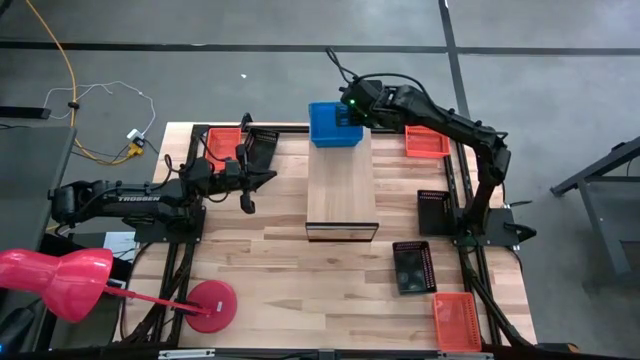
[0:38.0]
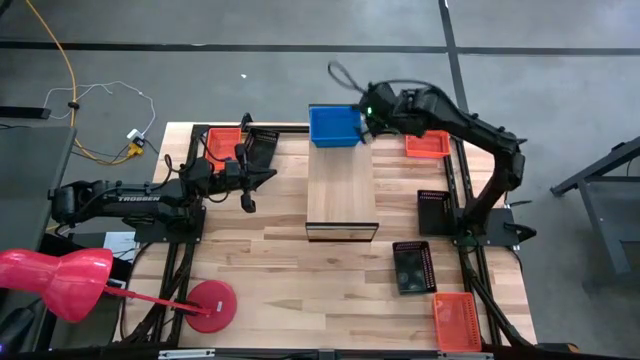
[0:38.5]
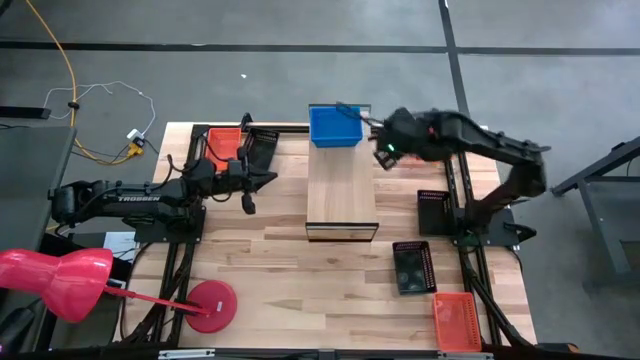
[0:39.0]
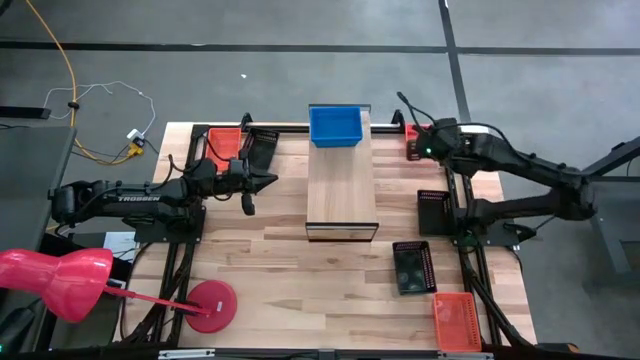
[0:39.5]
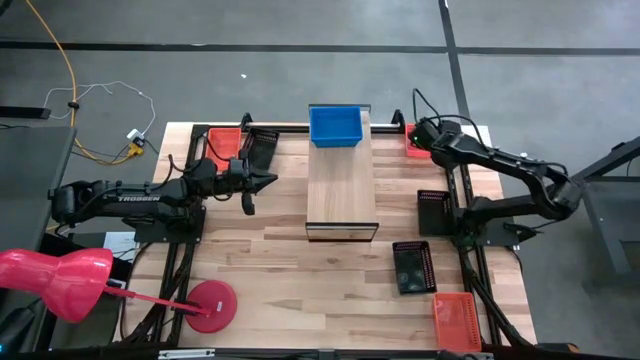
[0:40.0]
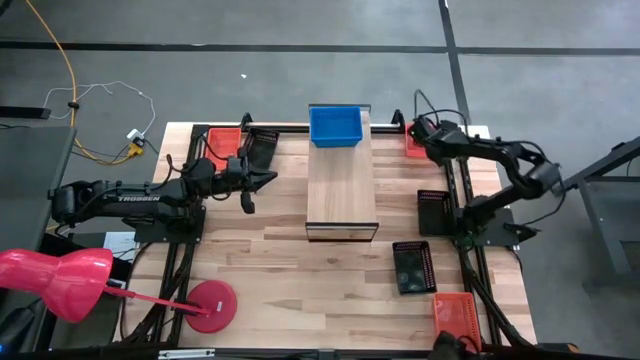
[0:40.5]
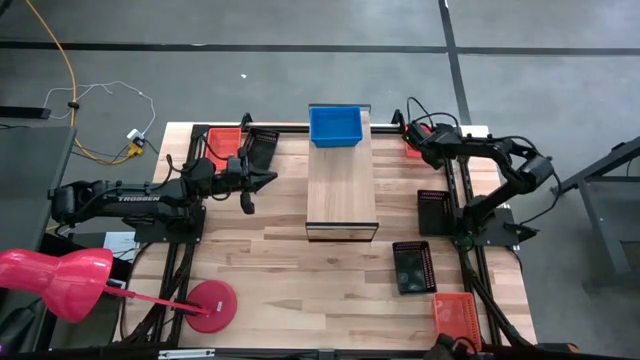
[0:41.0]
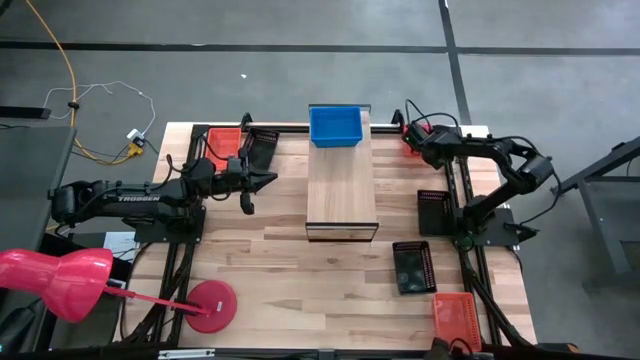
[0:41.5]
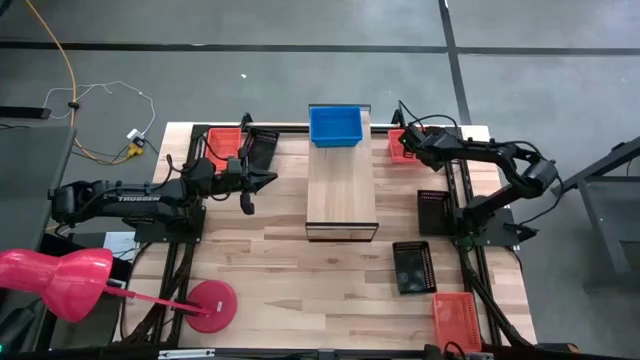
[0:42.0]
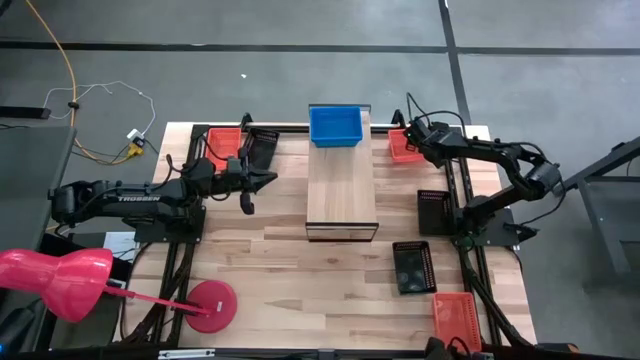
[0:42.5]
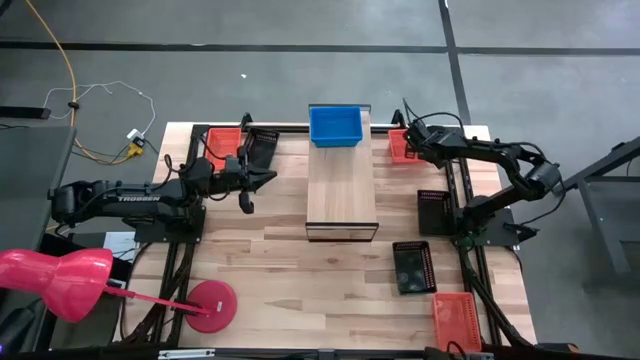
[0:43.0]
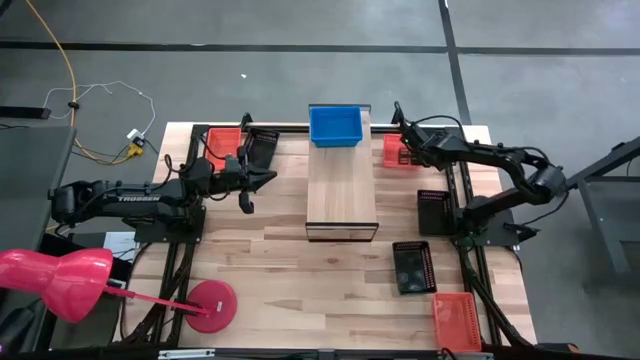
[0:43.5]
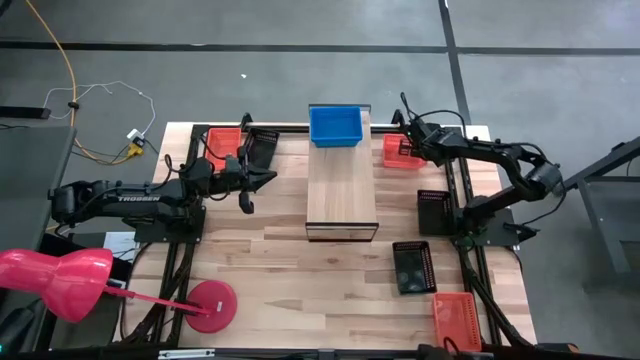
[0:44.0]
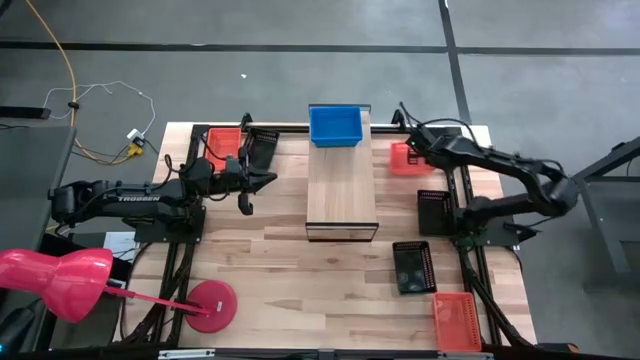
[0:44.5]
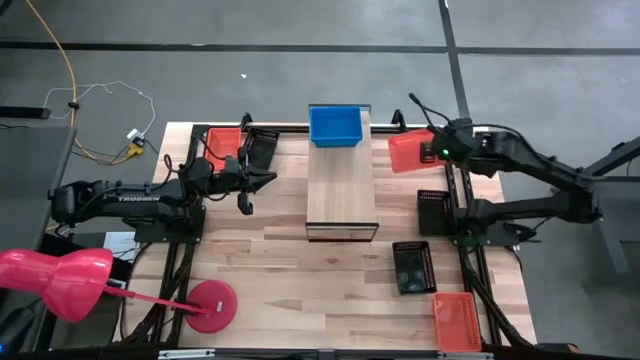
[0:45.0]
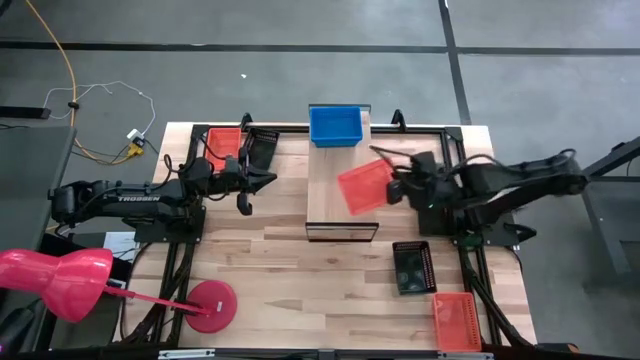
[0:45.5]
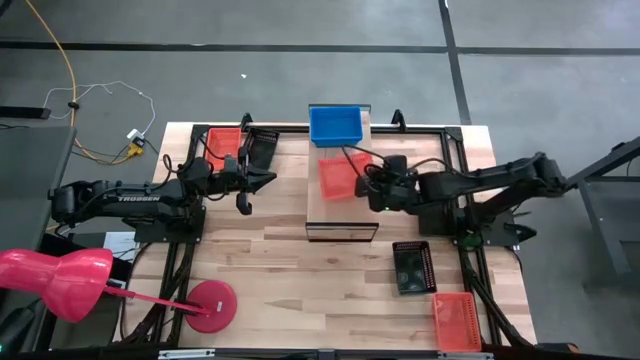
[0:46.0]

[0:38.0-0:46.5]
Task: Stack baskets on shelf by color
Put the top right orange bin on the shelf

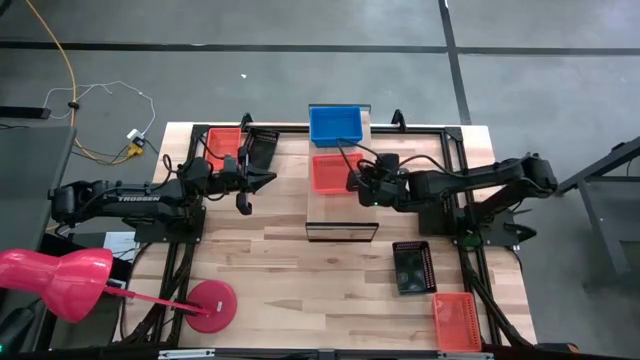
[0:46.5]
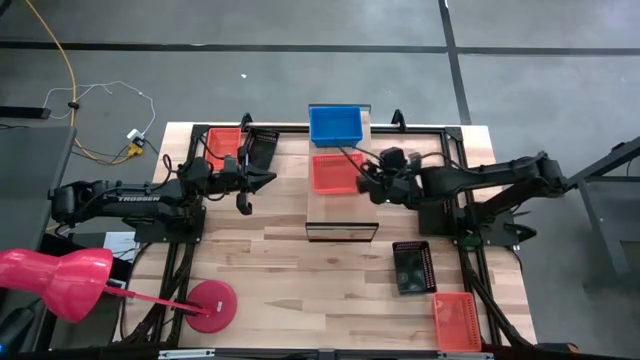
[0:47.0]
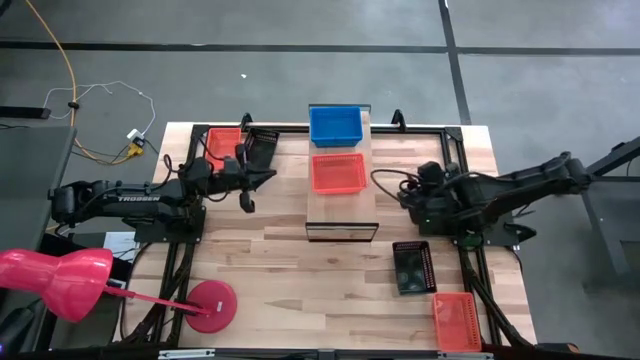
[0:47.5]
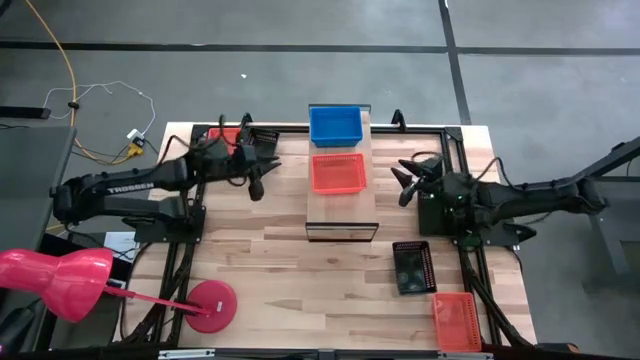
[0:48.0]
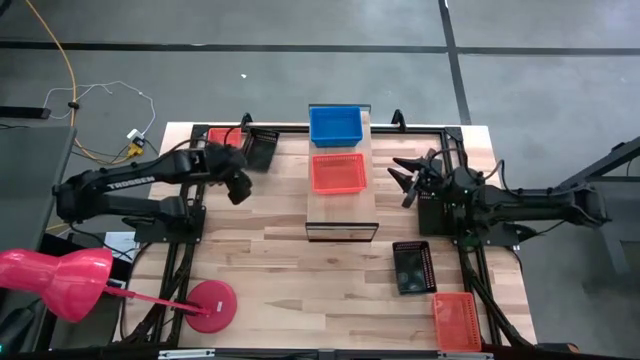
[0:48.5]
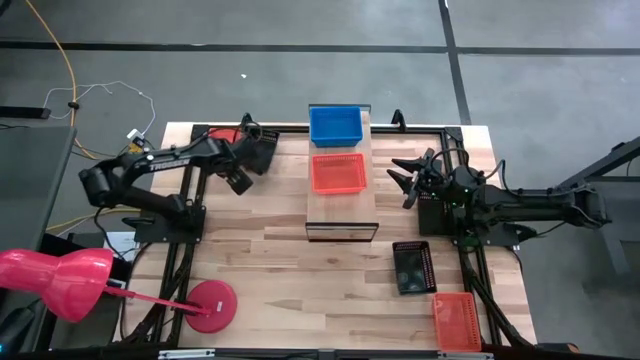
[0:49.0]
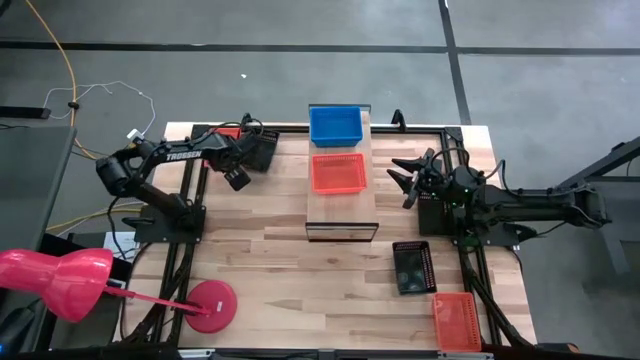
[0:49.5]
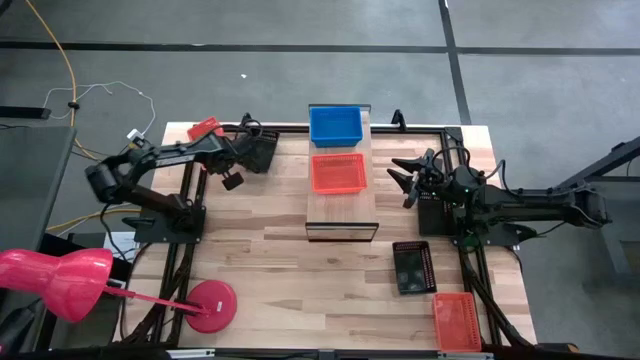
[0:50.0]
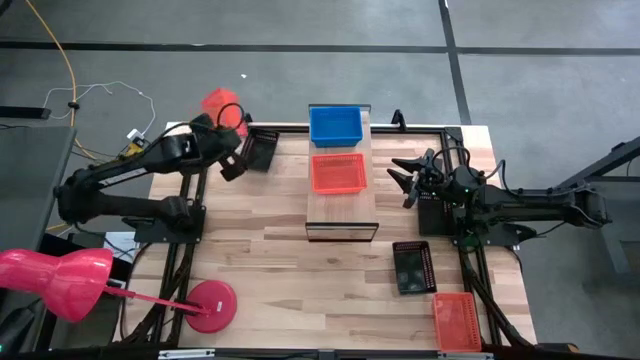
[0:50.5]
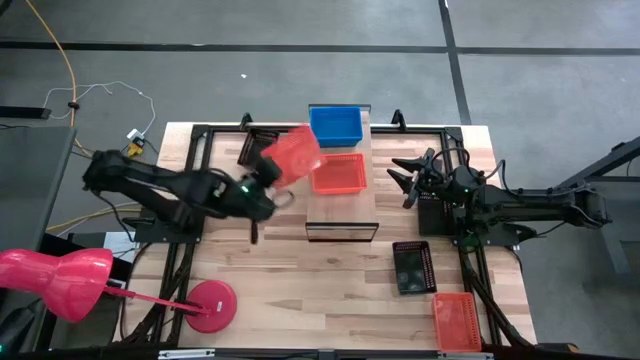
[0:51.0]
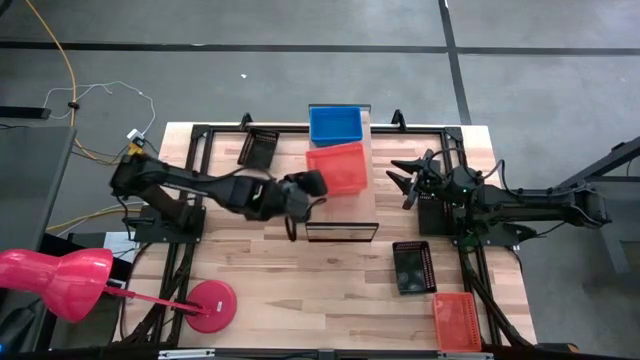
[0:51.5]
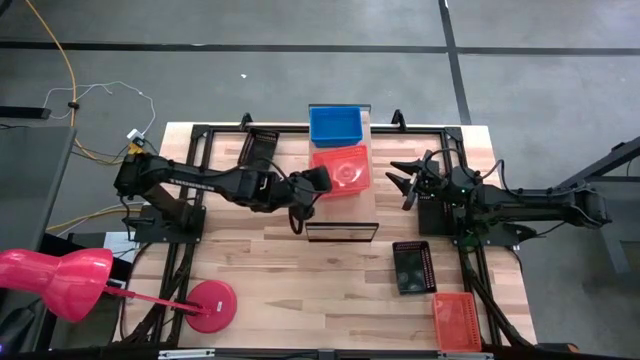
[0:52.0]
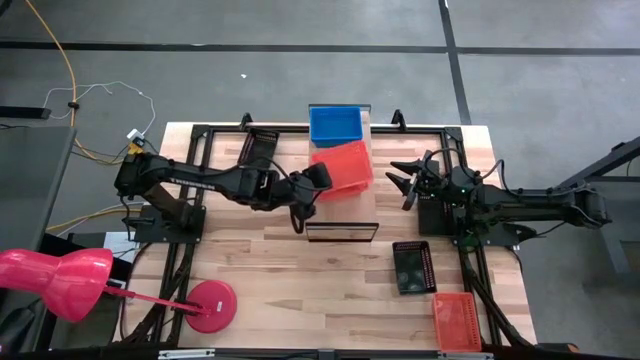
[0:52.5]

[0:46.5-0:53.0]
Stack the top orange bin on top of the orange bin on the shelf

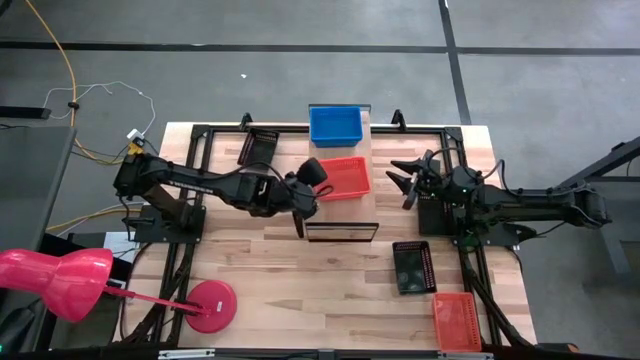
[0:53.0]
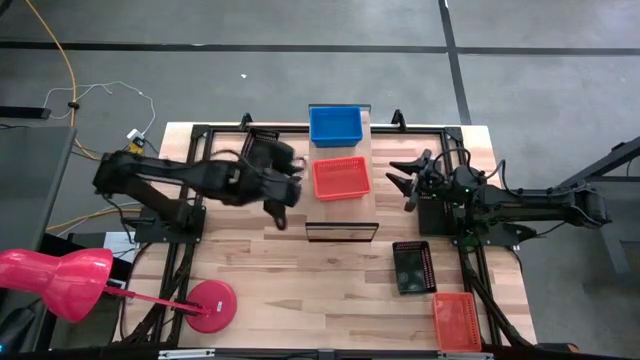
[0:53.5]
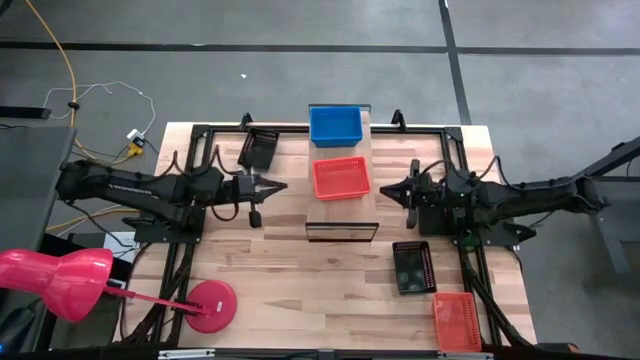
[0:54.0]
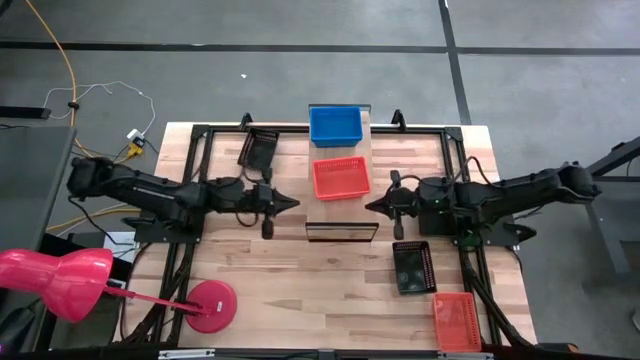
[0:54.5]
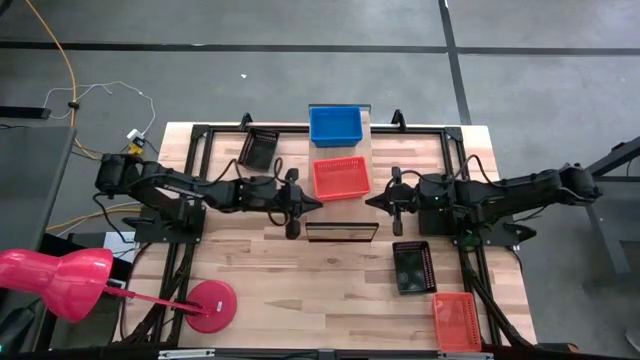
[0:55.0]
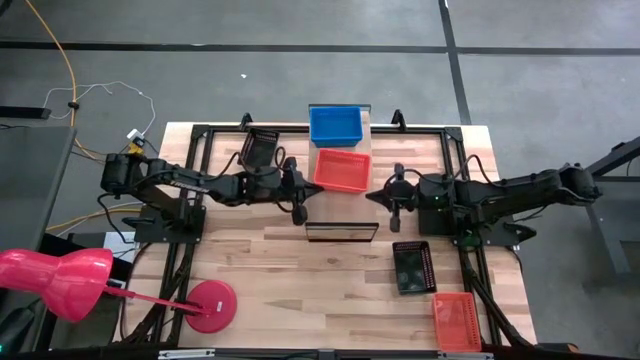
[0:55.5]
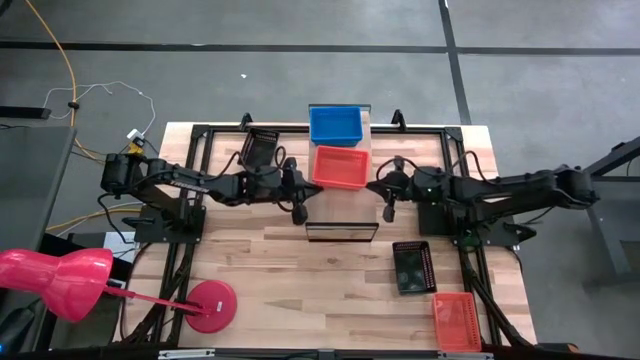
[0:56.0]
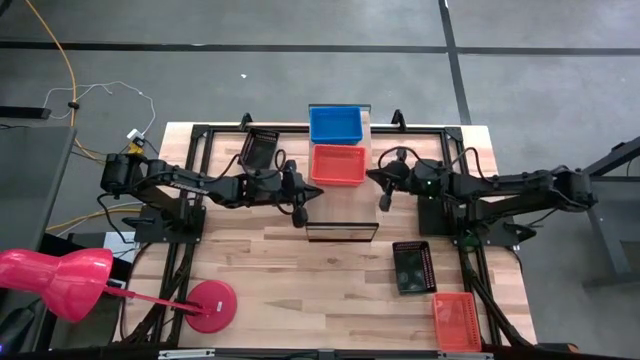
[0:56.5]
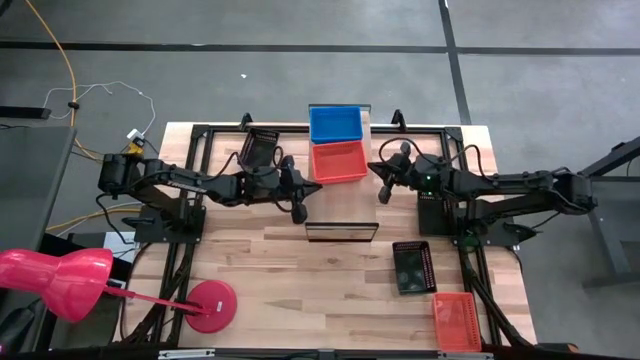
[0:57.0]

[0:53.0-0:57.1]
Adjust the stacked orange bins on the shelf

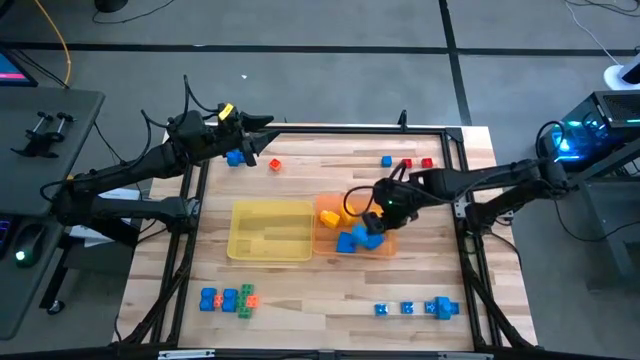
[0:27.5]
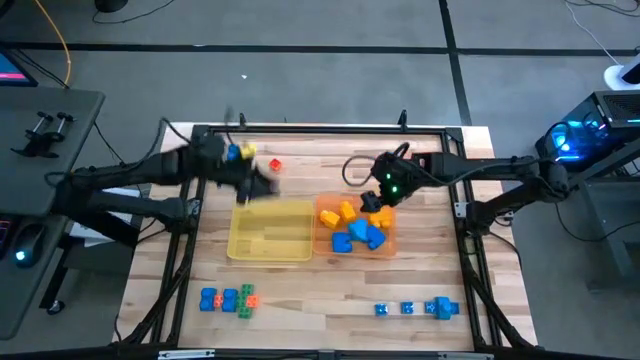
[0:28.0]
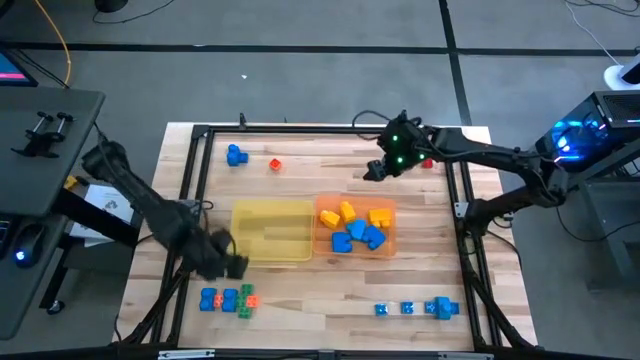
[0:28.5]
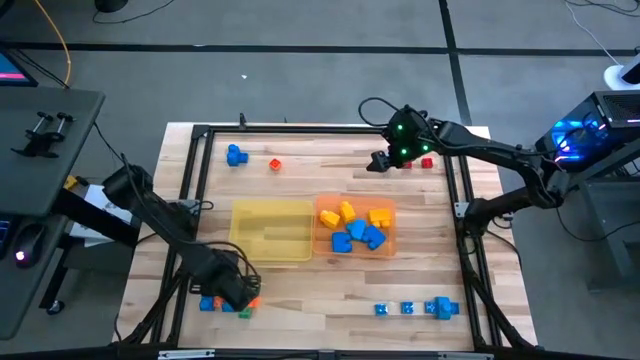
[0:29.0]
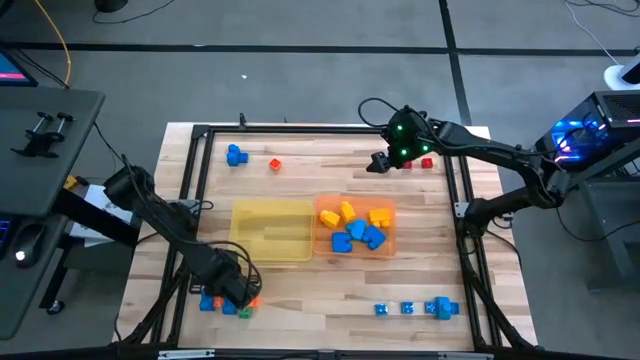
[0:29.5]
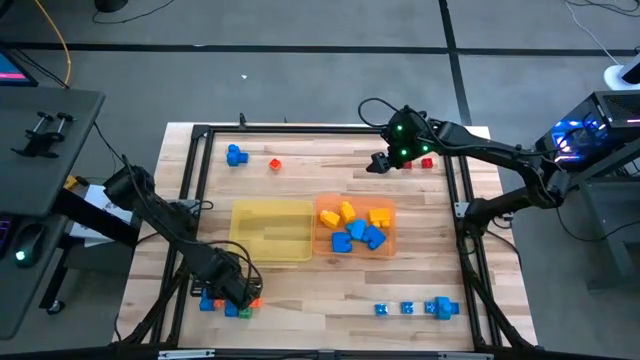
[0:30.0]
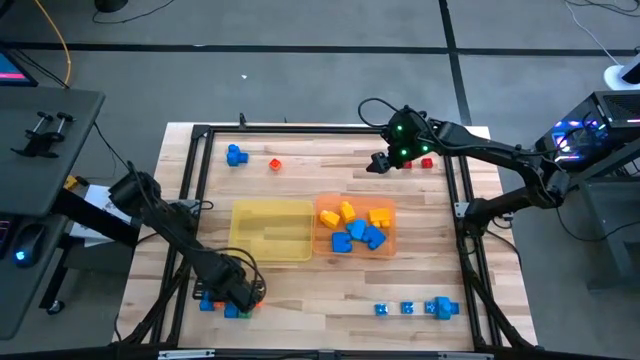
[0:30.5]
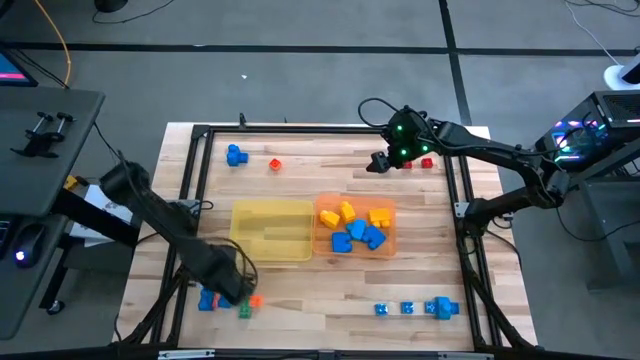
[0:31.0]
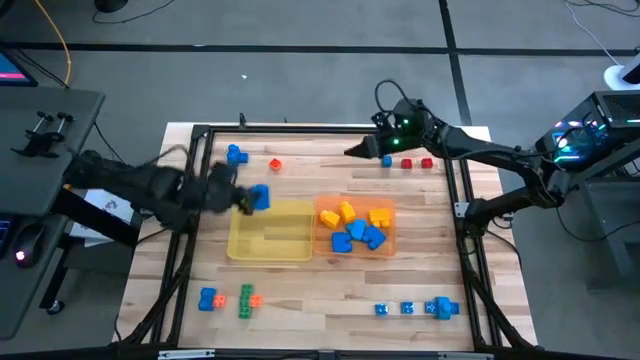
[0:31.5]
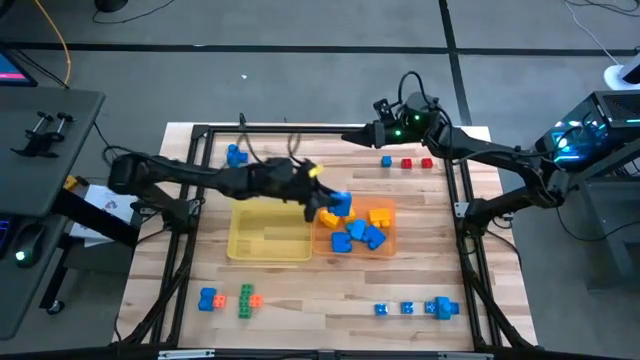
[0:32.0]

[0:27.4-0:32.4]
Task: Sort blocks by size
Put the large blue game piece into the orange bin
